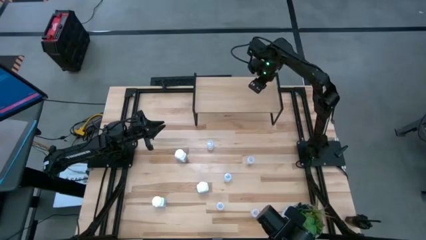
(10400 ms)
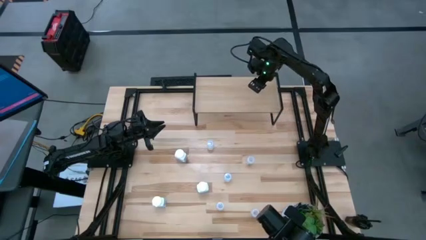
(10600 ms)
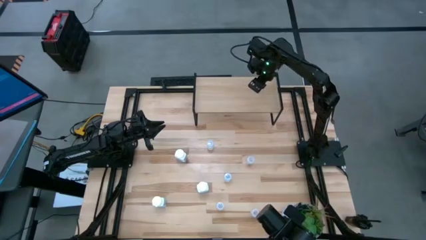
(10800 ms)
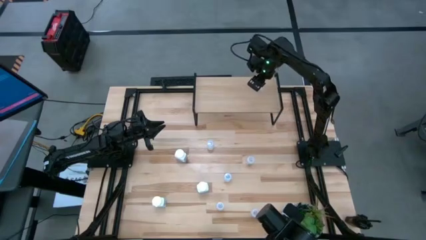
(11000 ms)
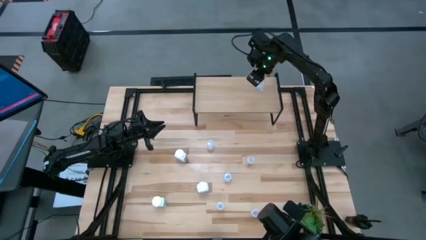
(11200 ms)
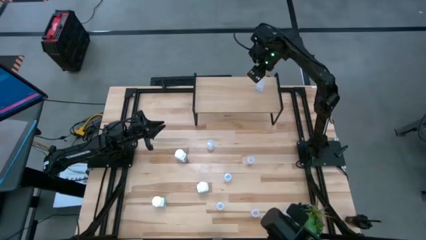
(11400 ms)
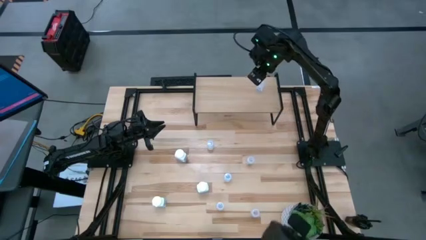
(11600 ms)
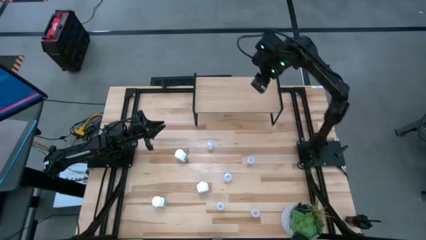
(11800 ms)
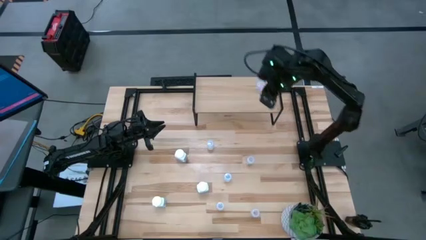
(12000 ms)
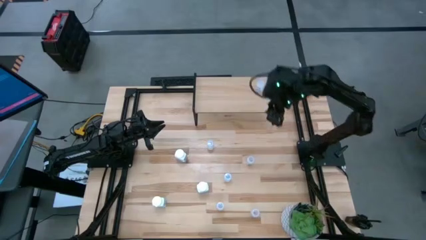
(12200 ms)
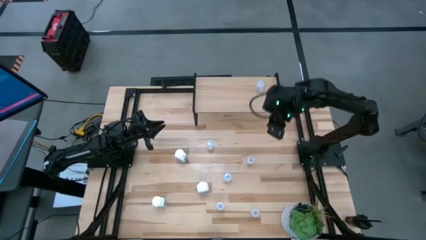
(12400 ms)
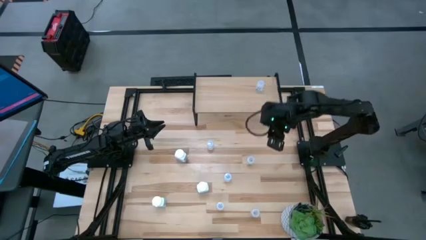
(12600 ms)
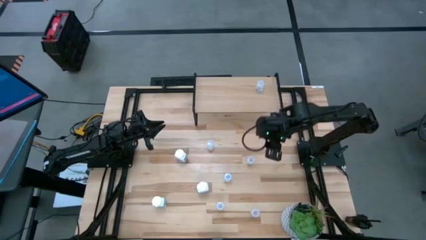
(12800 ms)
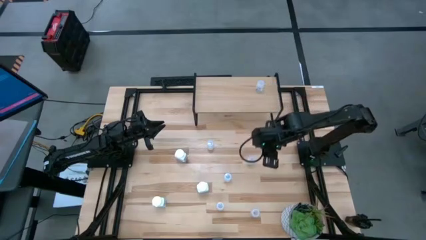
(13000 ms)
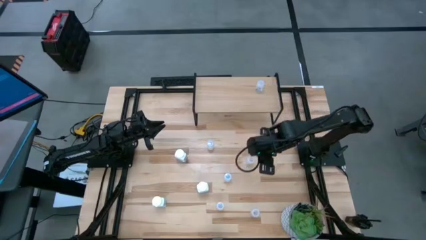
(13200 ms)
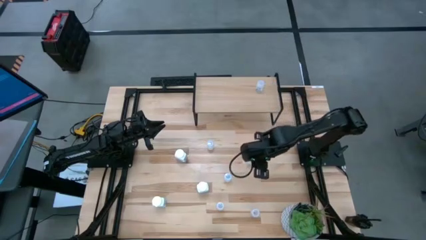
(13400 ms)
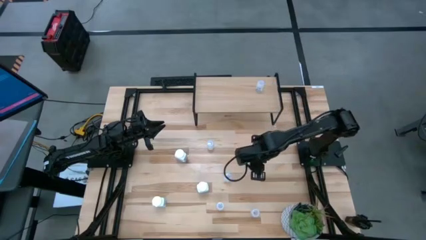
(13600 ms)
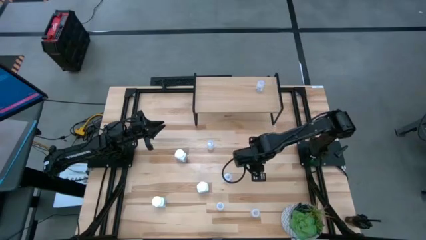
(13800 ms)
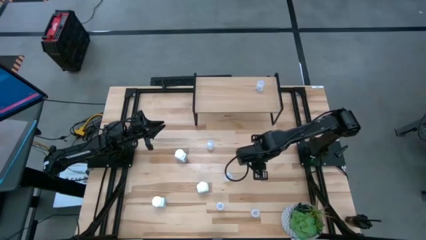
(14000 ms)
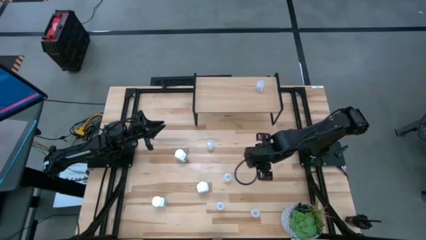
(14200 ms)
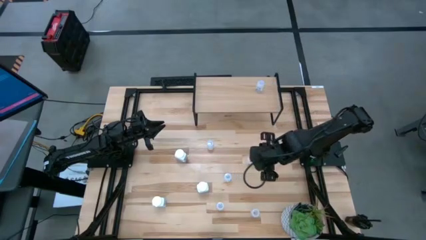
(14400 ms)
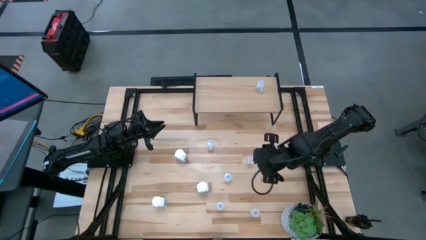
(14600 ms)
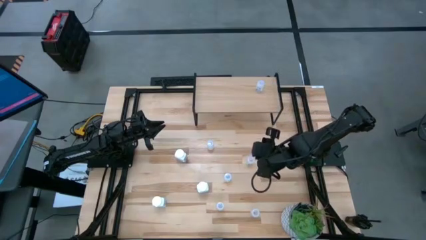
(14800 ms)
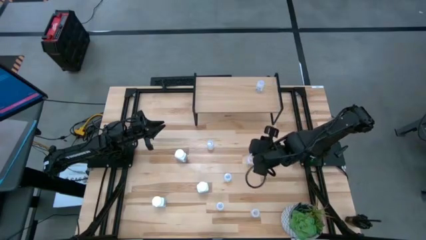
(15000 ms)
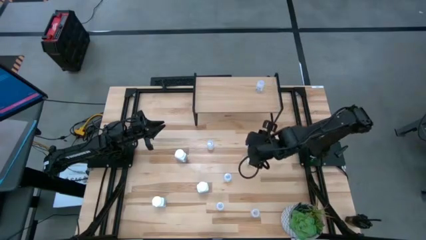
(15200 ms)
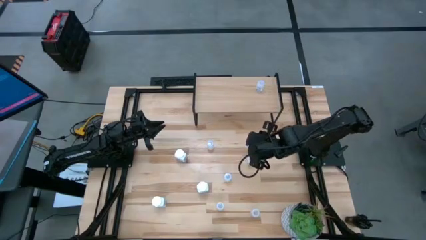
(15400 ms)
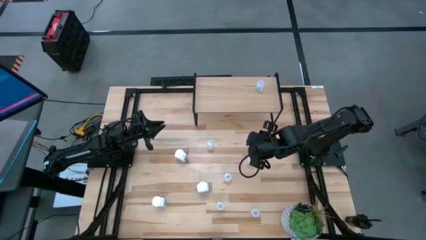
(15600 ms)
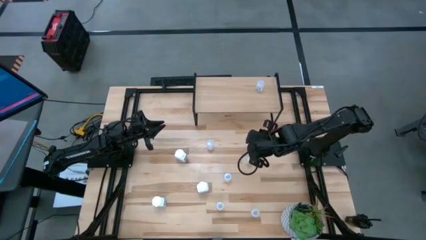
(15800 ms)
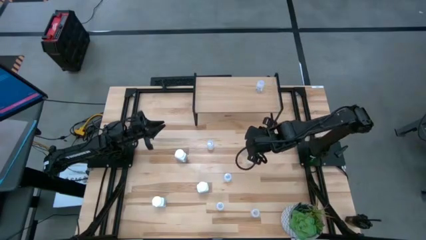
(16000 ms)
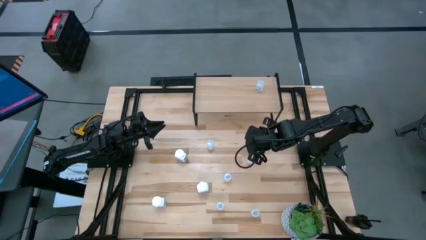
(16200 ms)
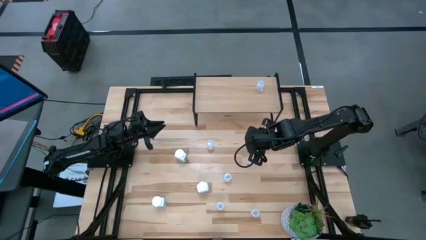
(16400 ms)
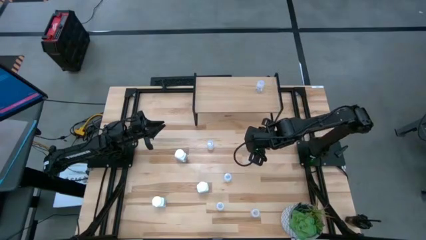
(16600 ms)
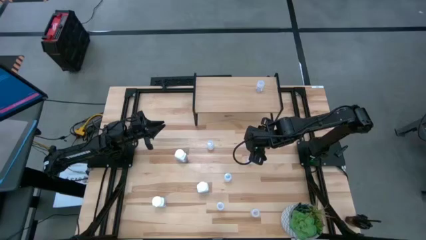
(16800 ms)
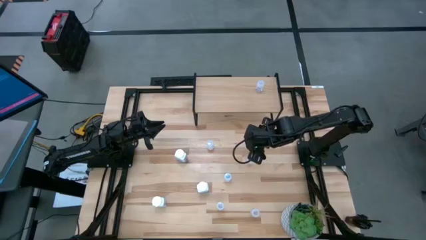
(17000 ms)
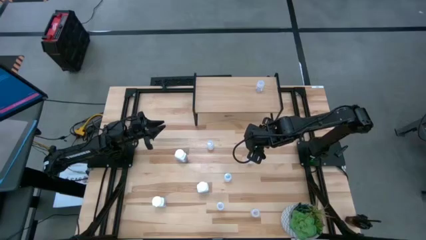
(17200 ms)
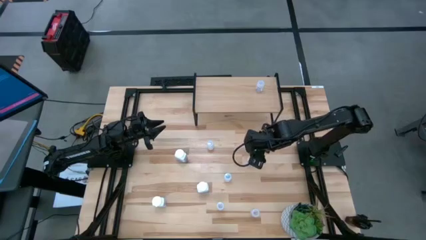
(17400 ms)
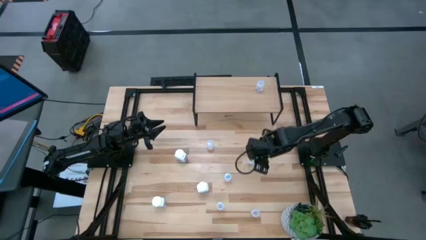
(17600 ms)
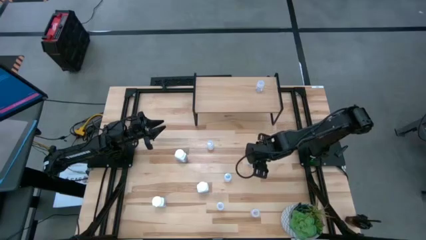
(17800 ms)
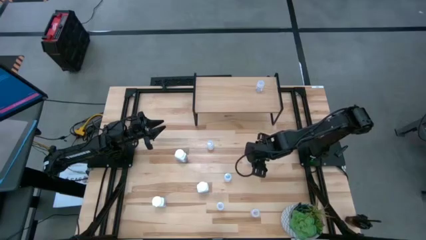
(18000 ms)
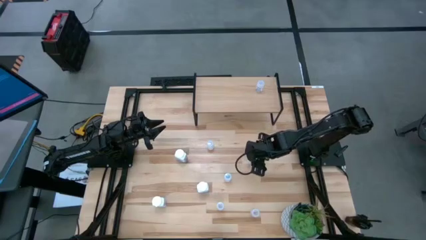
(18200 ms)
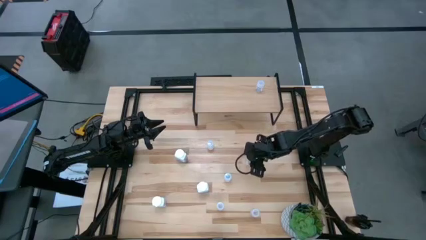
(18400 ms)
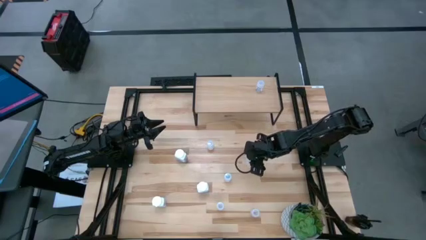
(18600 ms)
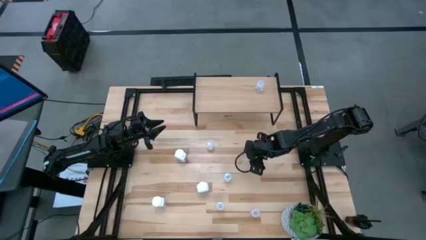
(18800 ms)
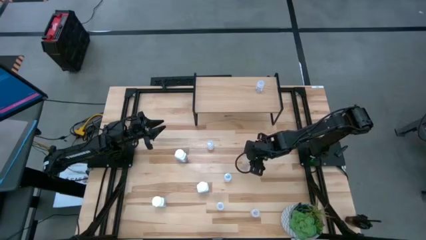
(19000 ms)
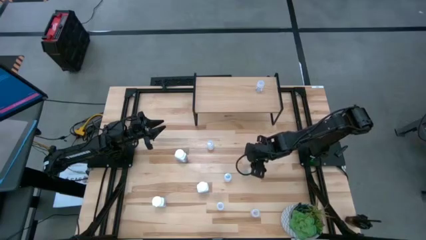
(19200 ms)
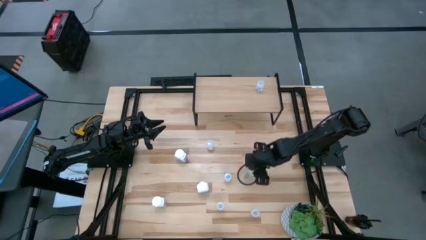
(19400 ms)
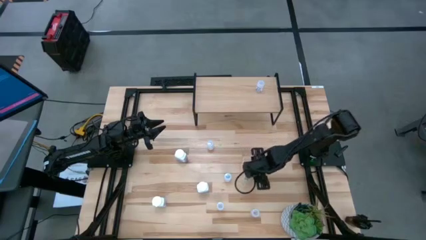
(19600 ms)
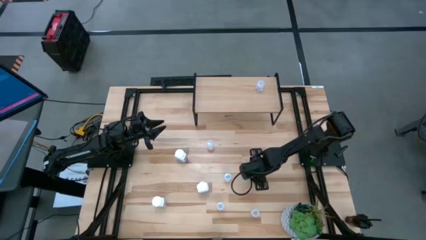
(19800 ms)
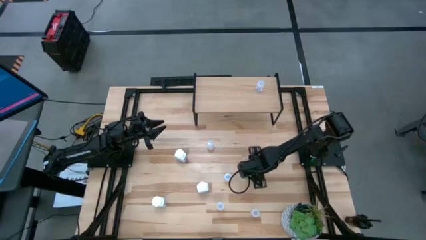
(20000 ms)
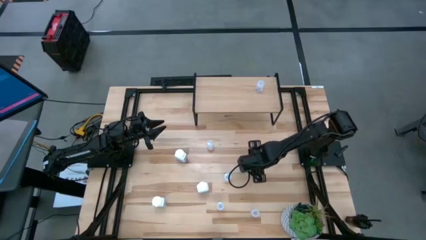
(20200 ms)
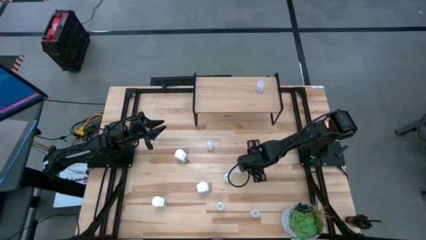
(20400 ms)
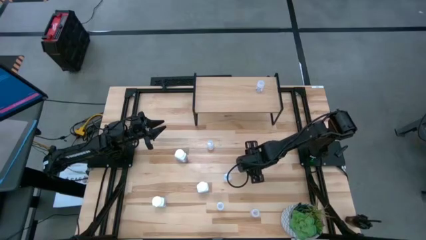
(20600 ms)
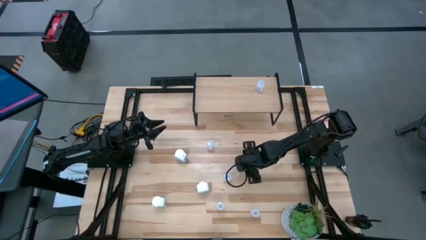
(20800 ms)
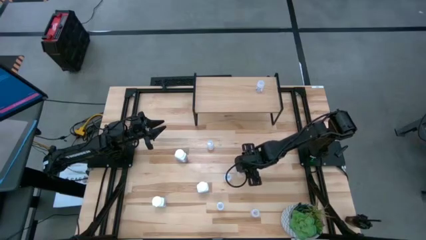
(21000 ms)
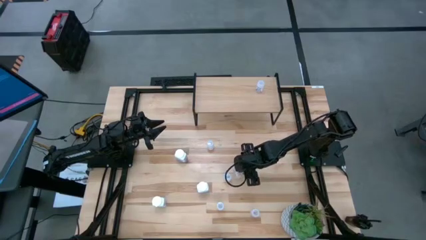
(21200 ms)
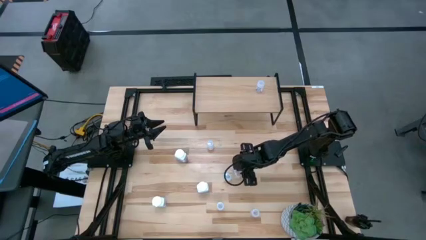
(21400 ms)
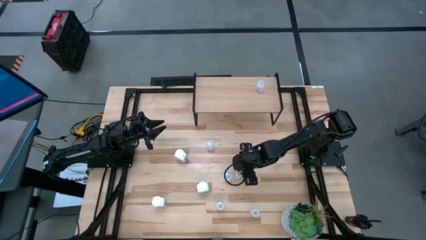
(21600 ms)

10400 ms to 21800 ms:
Task: Pick and place medicine bottles onto shelf by color
Put the top transparent pill bottle on the shelf
